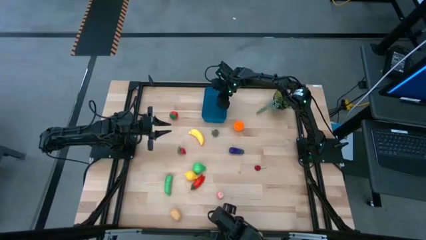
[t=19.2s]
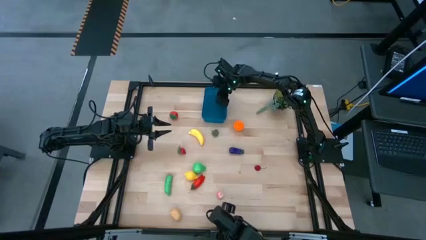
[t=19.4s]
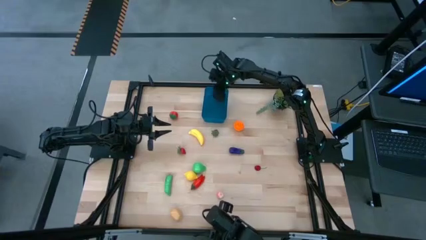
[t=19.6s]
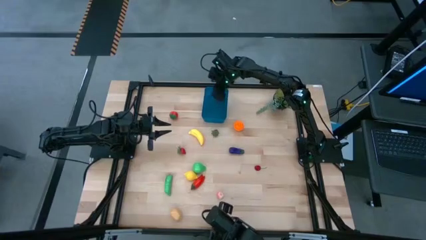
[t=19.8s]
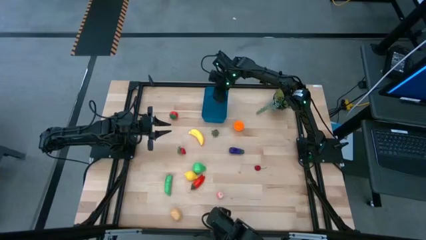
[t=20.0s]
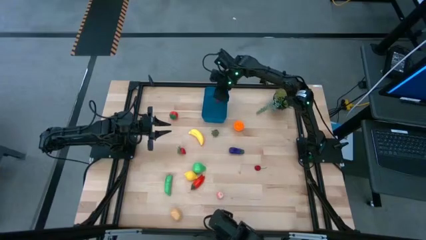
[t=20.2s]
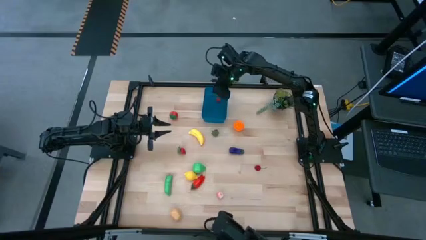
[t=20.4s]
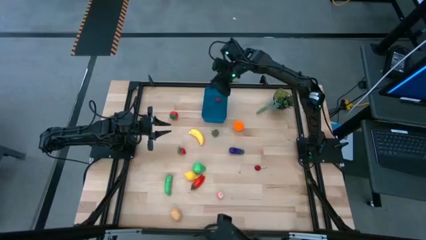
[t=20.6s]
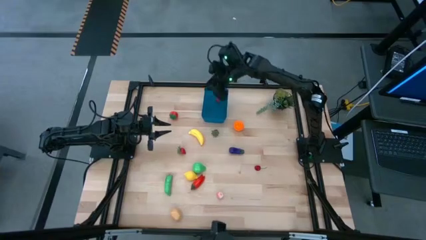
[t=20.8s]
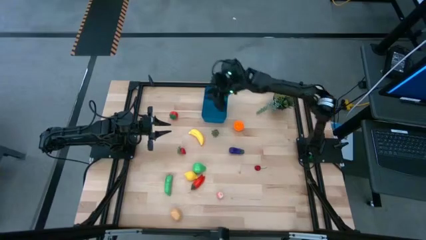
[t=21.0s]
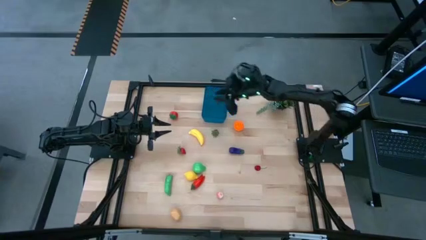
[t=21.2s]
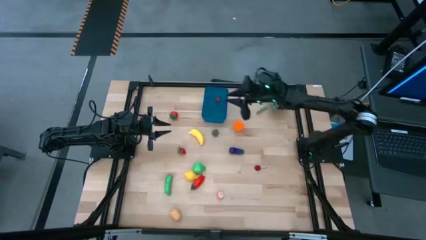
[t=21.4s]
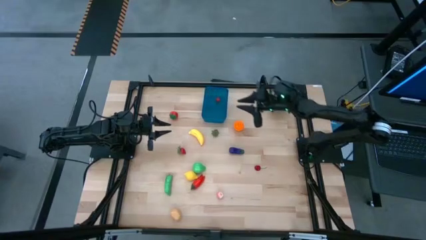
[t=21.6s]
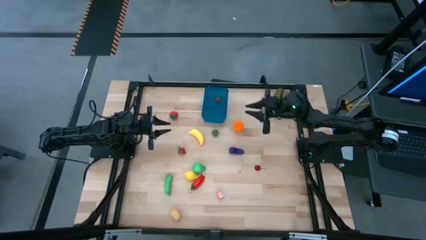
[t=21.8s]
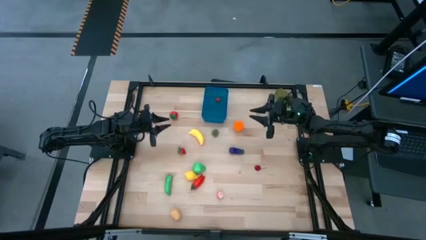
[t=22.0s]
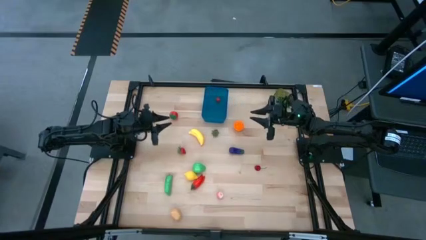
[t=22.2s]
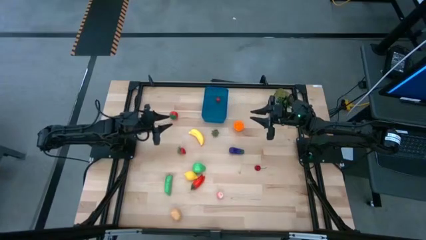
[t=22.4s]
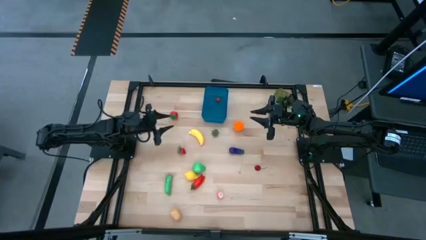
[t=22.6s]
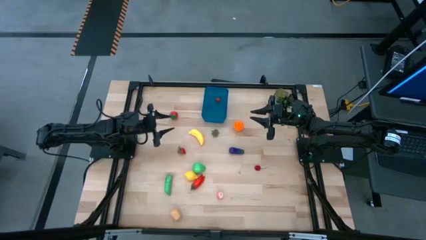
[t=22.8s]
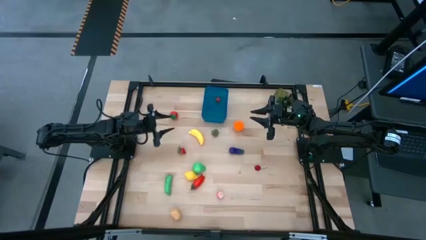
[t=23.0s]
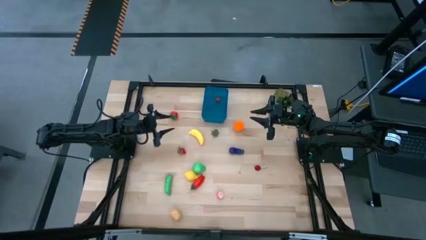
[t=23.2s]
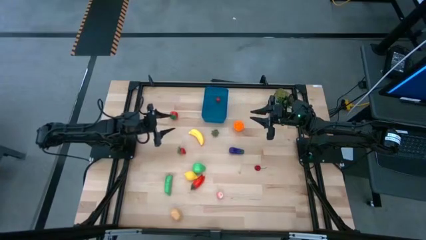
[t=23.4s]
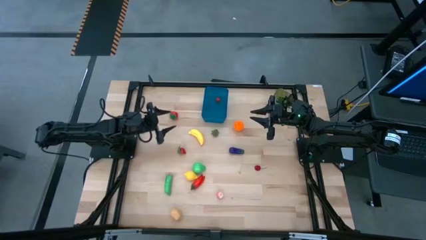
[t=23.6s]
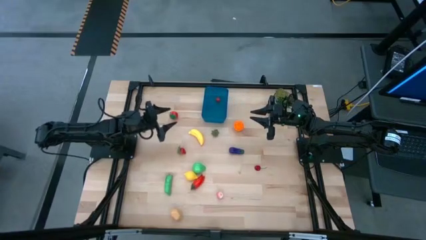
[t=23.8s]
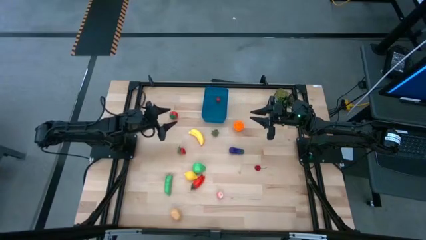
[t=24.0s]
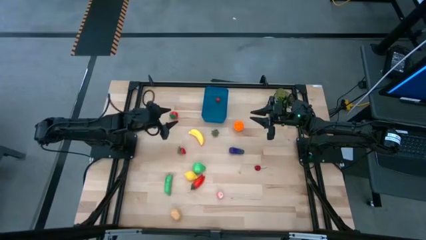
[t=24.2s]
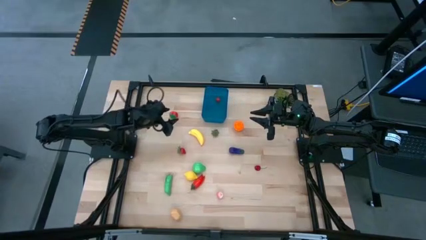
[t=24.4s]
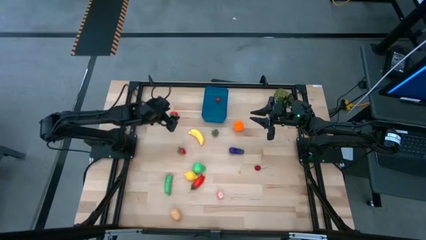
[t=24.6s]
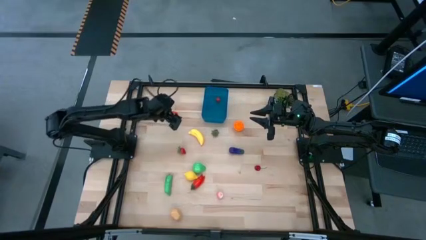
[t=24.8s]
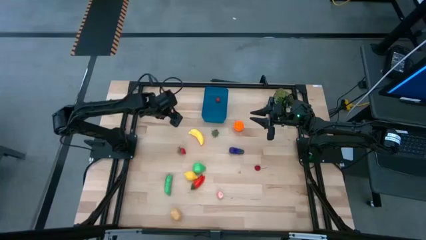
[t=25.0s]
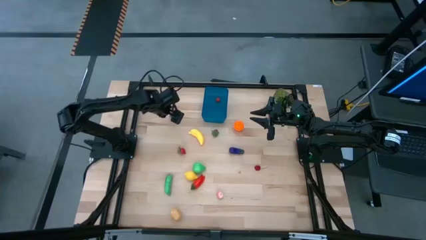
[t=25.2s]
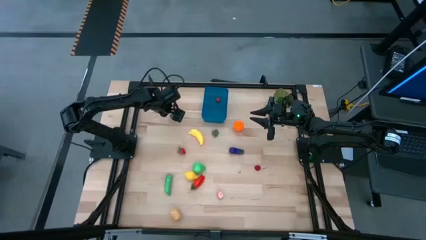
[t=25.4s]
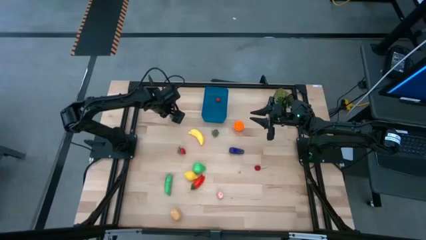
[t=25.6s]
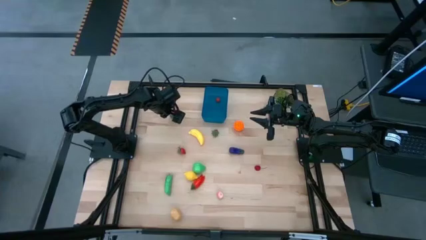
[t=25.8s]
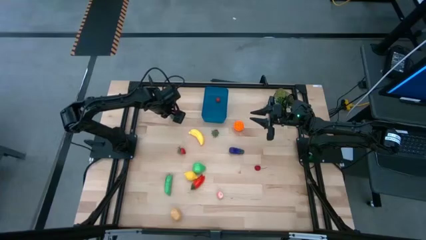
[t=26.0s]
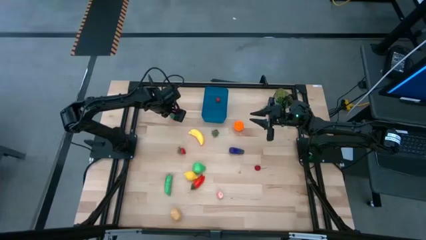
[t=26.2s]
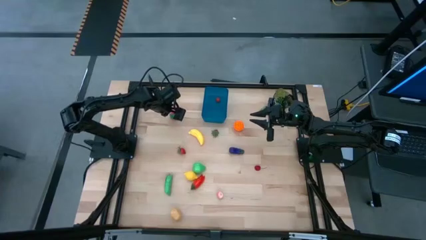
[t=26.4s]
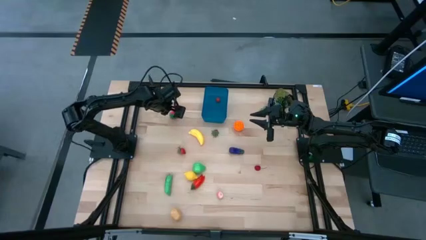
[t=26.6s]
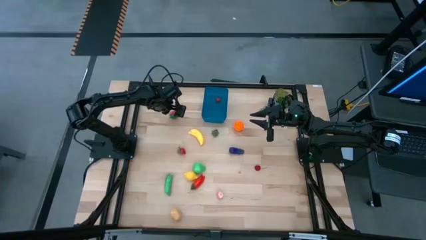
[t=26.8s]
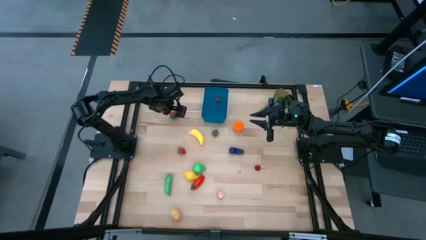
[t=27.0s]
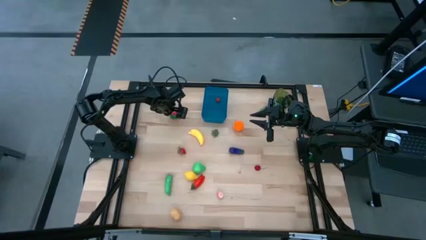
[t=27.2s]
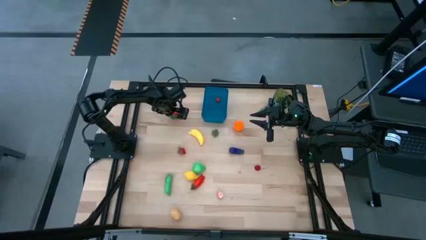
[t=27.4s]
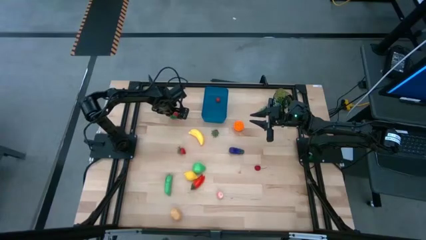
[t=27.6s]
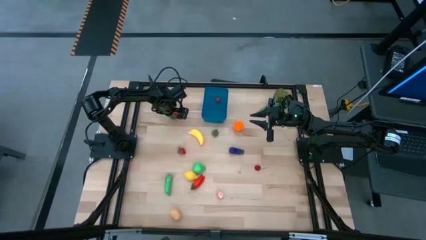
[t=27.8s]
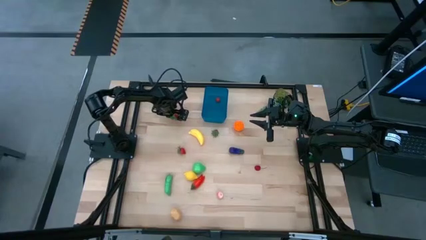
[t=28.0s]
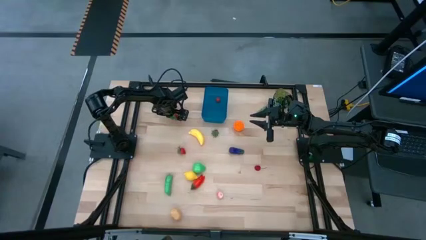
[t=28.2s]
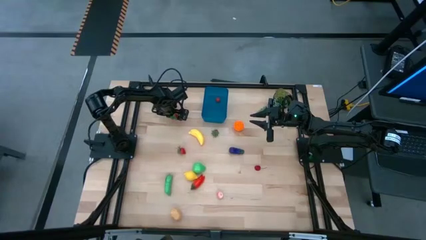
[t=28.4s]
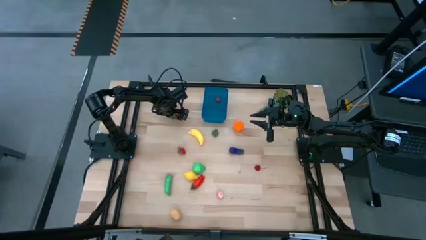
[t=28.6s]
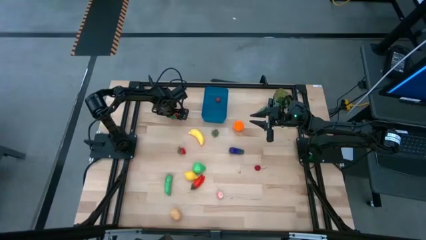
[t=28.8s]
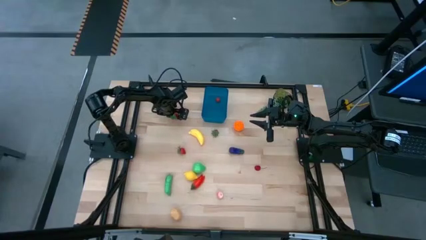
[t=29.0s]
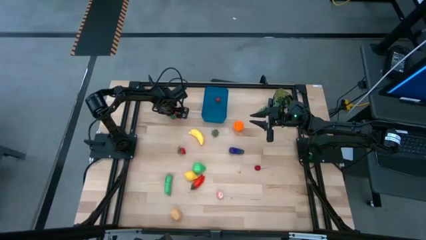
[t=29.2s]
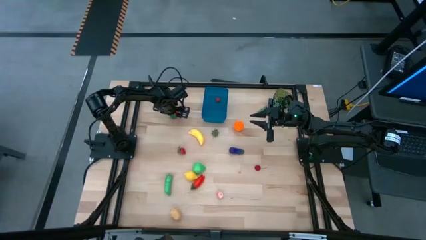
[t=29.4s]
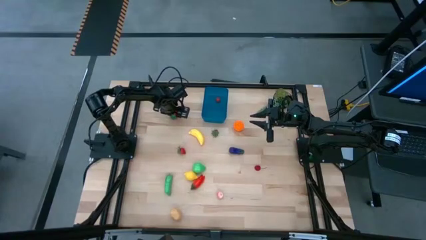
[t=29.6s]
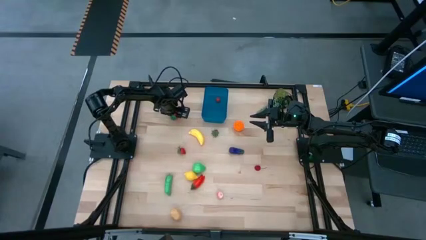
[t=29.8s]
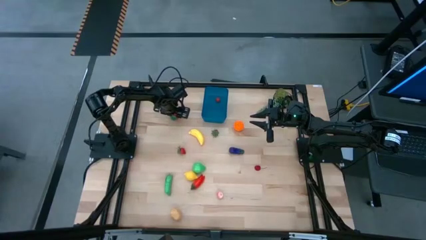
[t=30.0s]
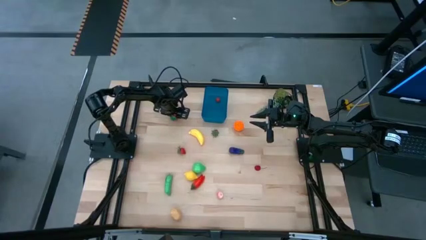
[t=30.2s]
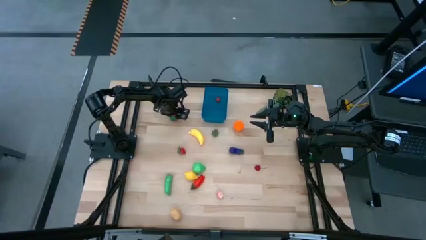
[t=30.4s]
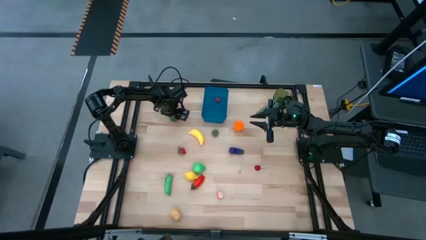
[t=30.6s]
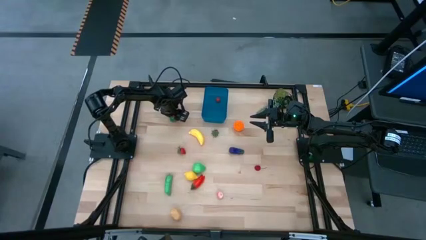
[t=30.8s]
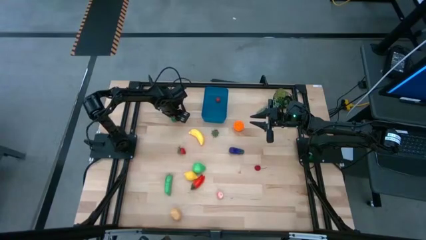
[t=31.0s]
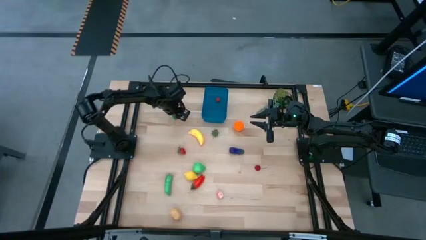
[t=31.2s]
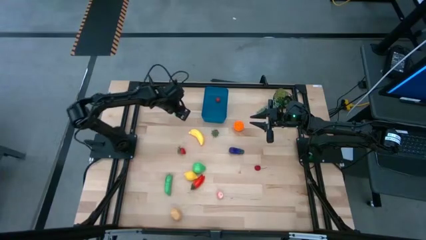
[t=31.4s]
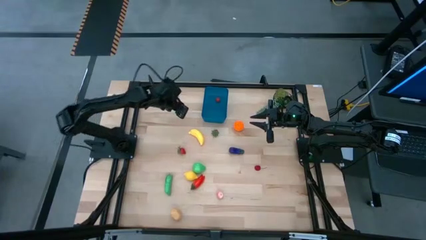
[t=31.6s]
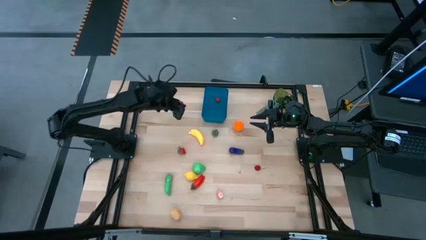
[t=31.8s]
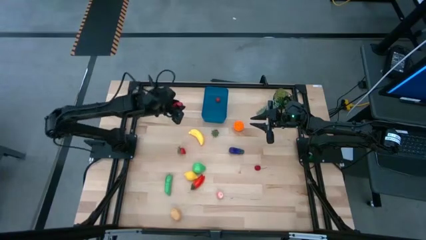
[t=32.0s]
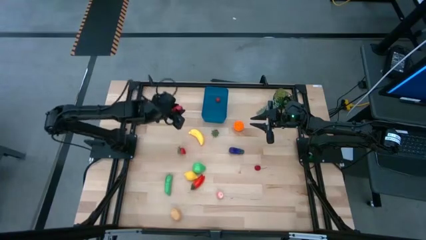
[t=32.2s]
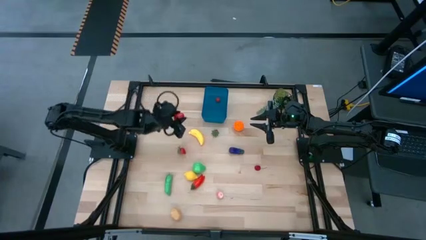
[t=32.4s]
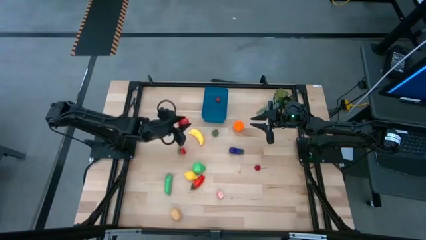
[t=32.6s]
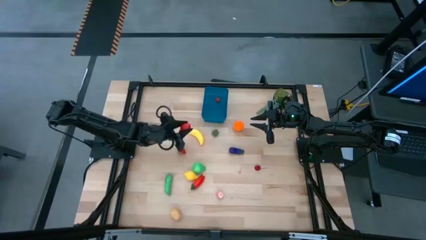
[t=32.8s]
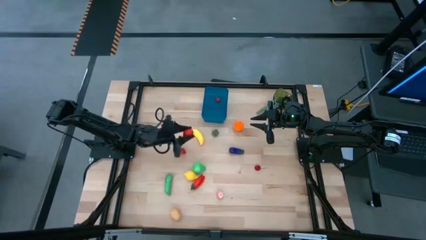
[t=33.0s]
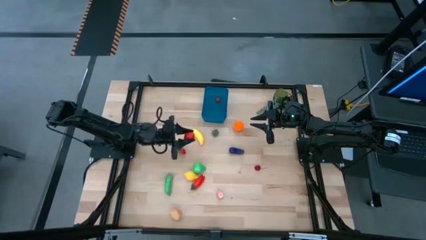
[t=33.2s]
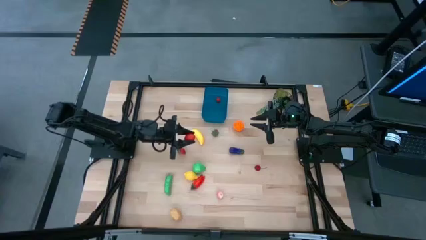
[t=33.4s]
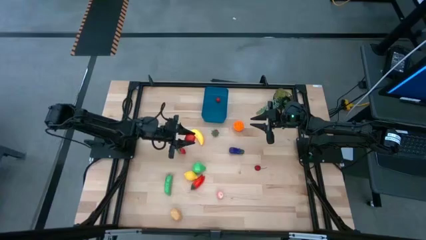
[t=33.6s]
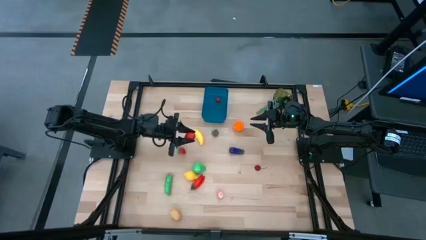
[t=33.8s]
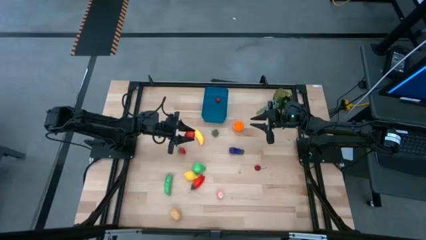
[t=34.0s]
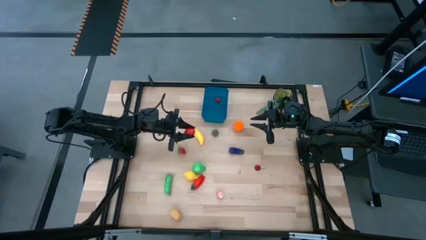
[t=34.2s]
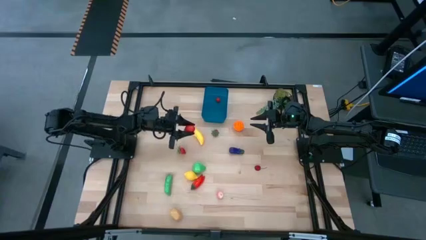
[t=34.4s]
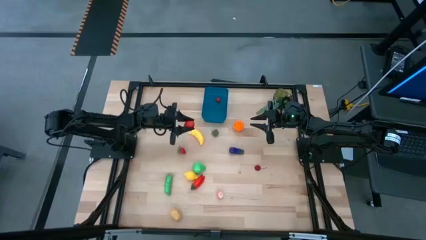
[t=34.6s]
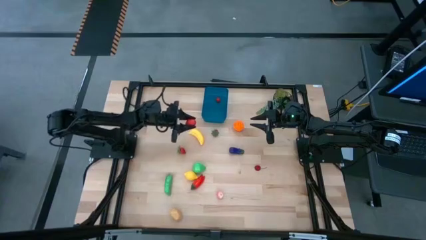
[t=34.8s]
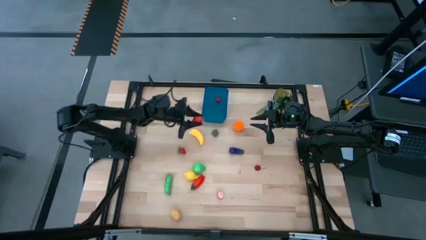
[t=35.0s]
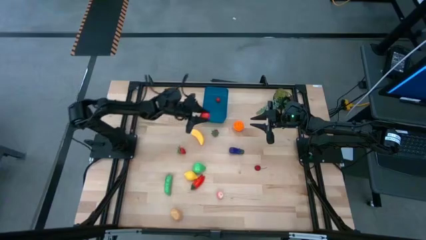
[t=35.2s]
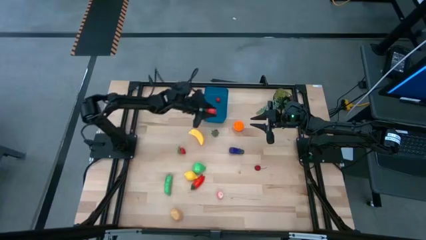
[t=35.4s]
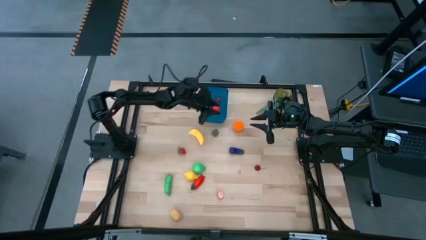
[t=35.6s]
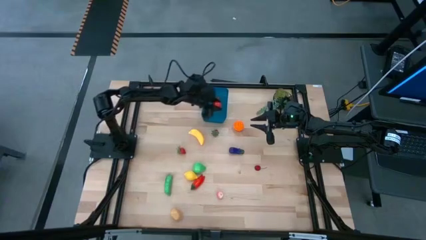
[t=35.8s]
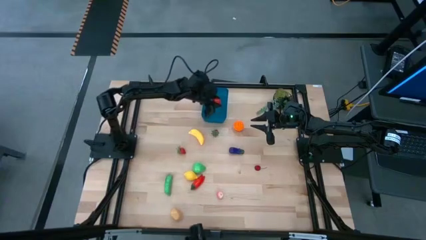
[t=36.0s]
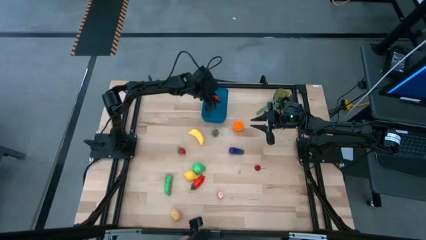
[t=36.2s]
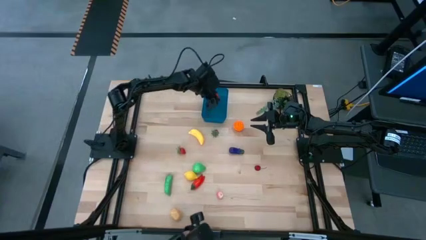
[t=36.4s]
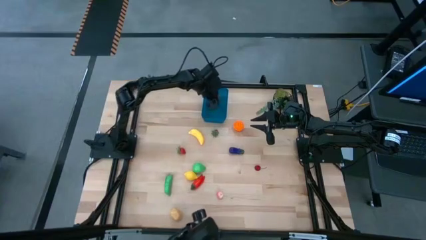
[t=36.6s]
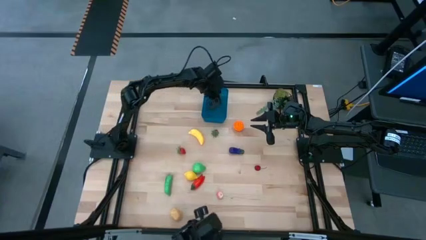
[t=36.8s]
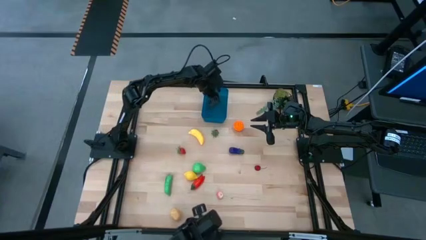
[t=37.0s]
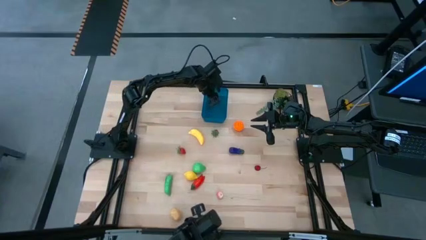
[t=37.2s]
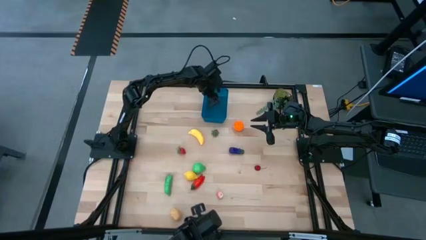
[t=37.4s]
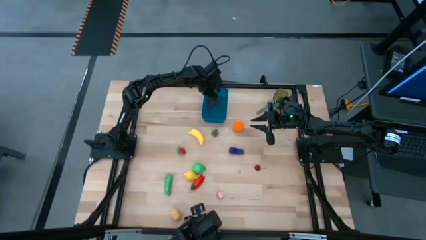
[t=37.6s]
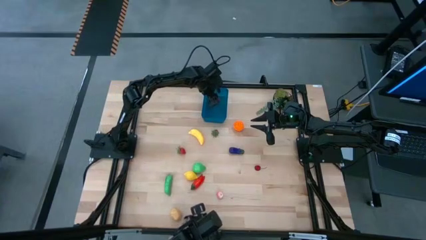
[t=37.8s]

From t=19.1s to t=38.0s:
Task: Pick and placing Produce into tupperware
Put the top left strawberry into the blue bin
